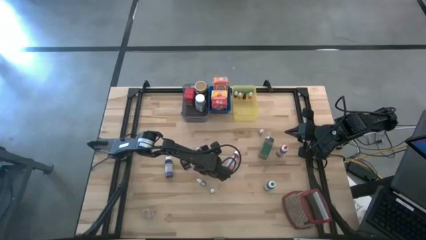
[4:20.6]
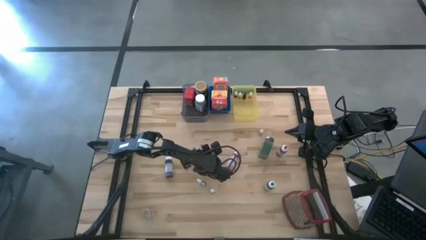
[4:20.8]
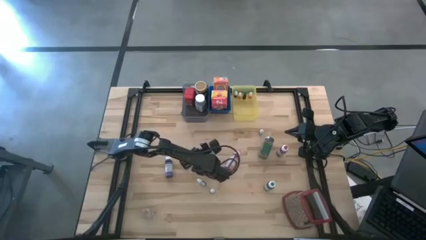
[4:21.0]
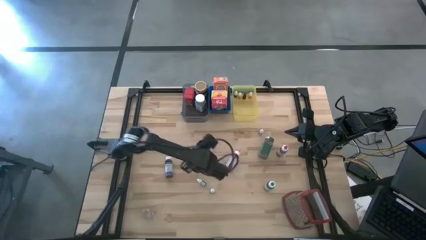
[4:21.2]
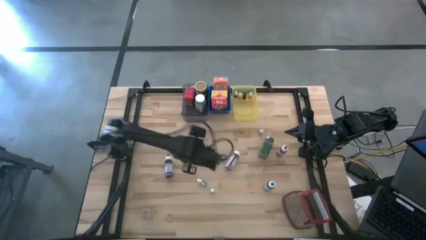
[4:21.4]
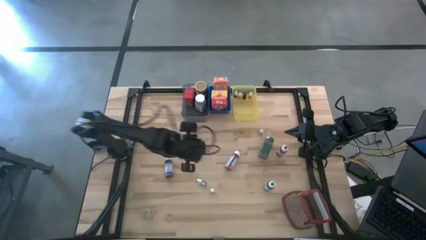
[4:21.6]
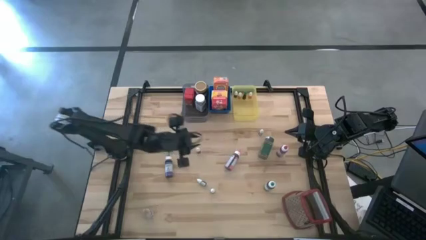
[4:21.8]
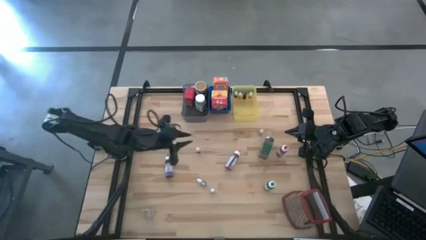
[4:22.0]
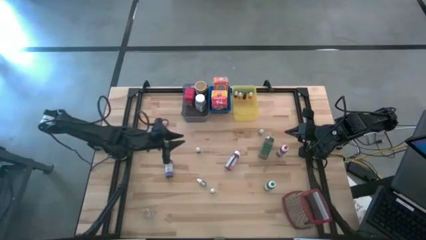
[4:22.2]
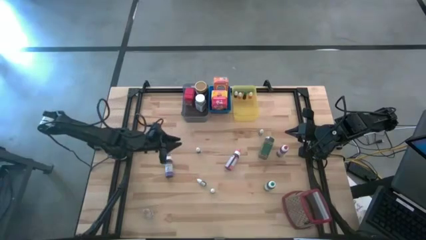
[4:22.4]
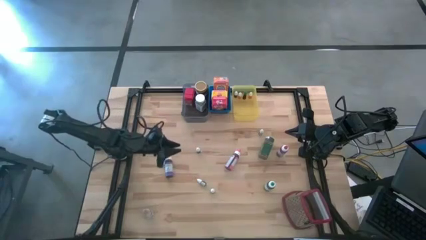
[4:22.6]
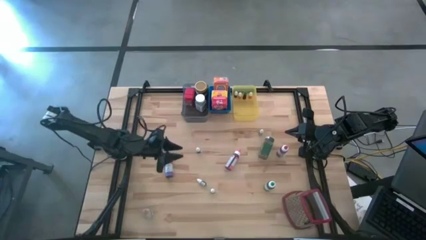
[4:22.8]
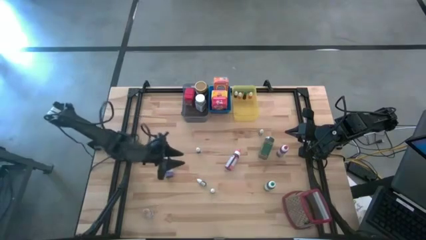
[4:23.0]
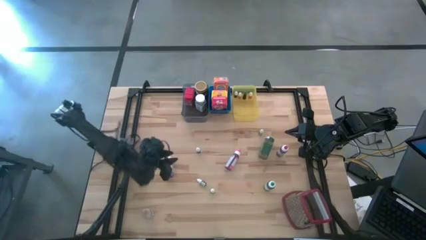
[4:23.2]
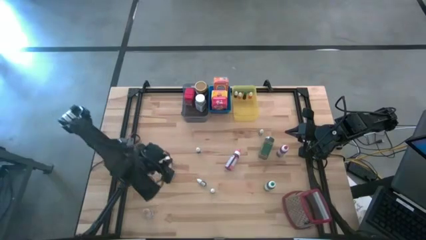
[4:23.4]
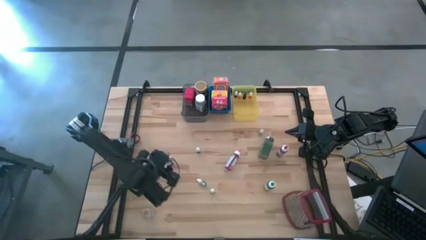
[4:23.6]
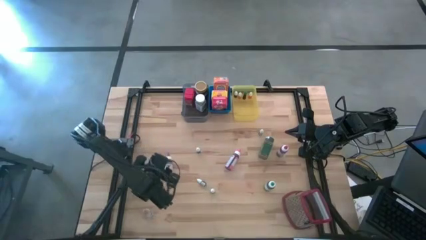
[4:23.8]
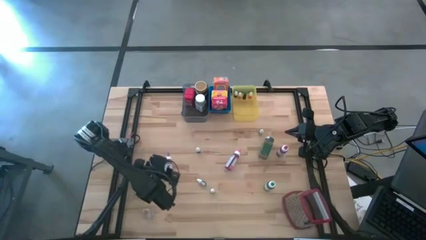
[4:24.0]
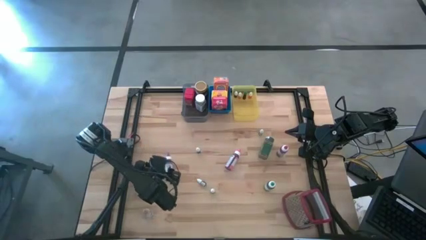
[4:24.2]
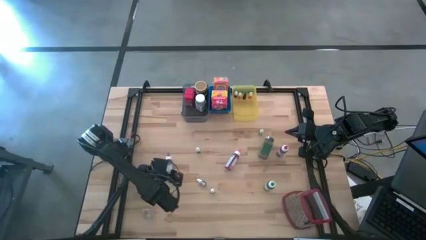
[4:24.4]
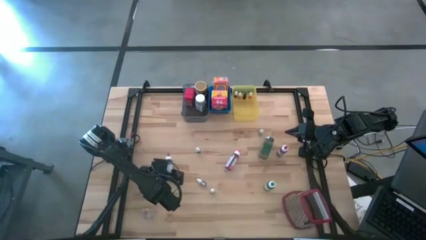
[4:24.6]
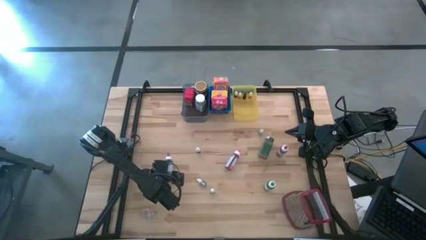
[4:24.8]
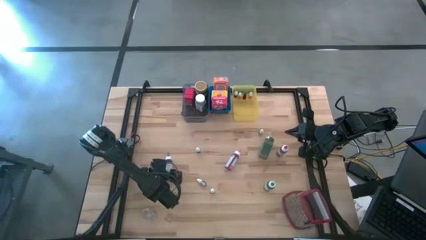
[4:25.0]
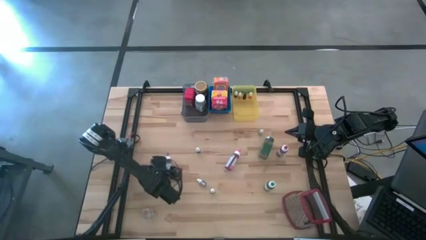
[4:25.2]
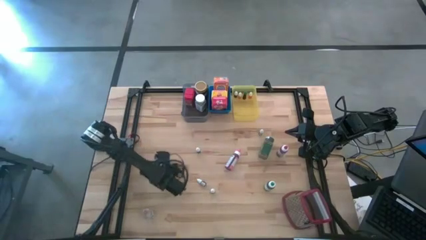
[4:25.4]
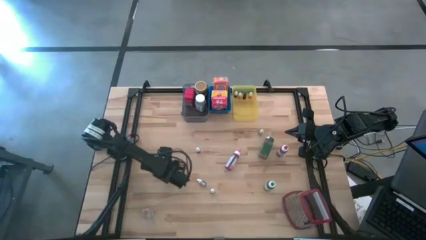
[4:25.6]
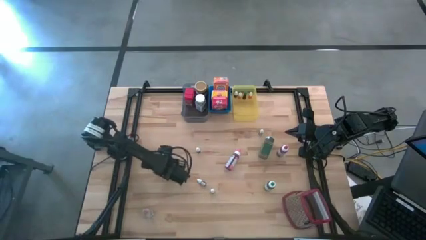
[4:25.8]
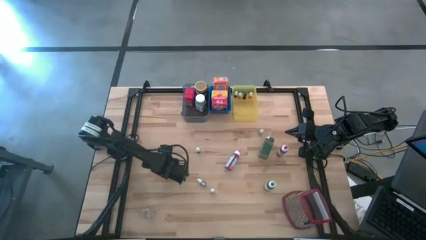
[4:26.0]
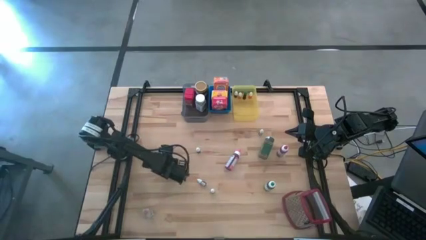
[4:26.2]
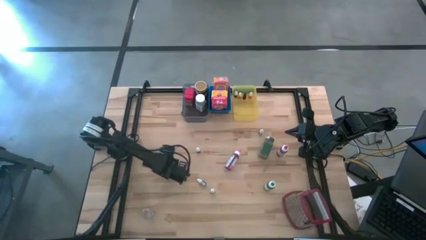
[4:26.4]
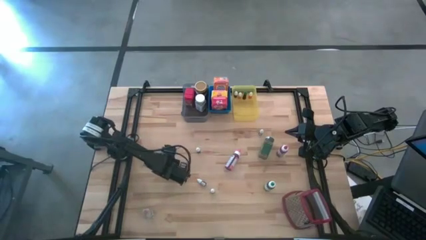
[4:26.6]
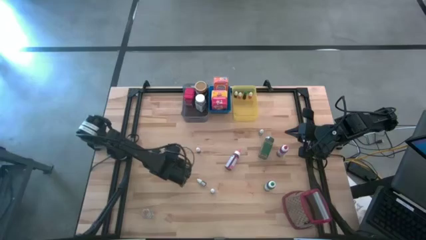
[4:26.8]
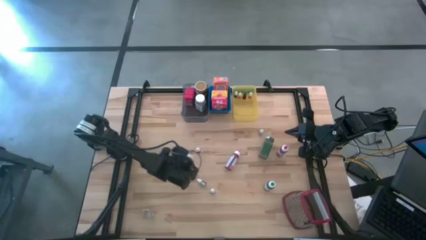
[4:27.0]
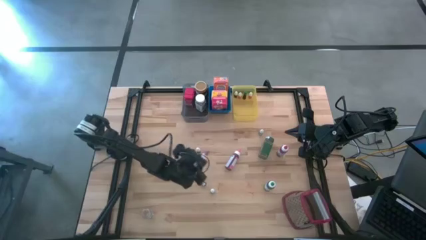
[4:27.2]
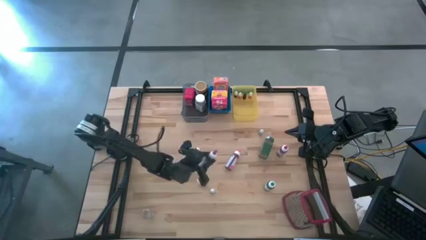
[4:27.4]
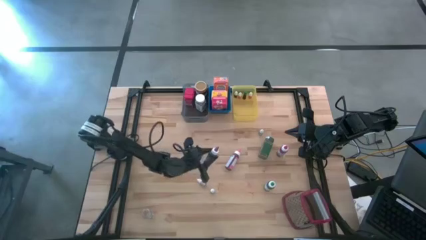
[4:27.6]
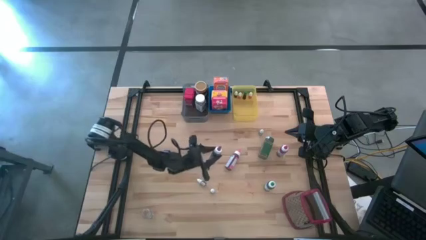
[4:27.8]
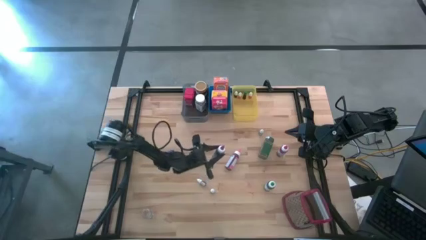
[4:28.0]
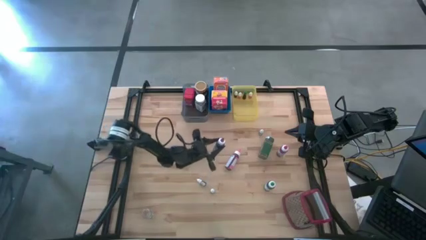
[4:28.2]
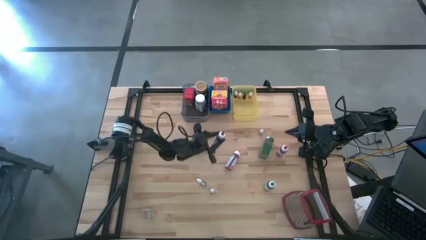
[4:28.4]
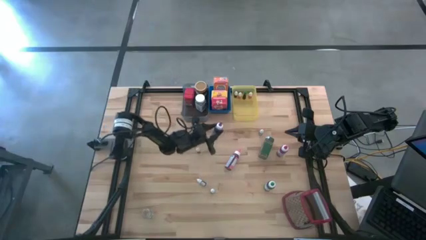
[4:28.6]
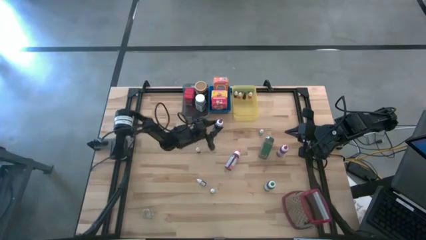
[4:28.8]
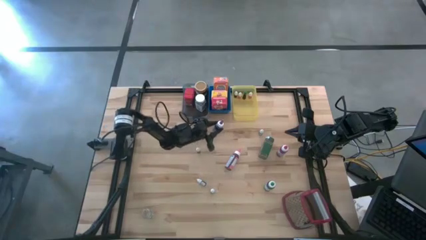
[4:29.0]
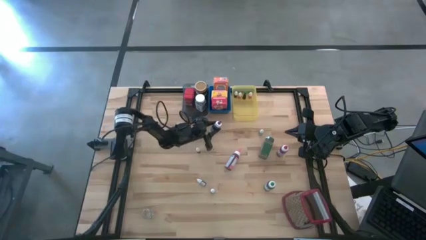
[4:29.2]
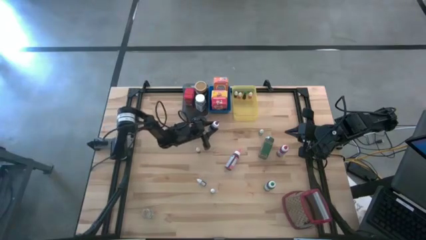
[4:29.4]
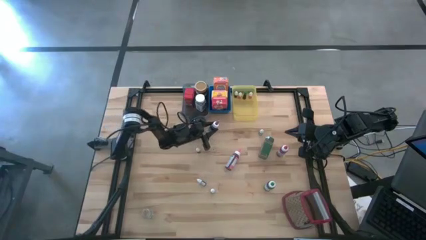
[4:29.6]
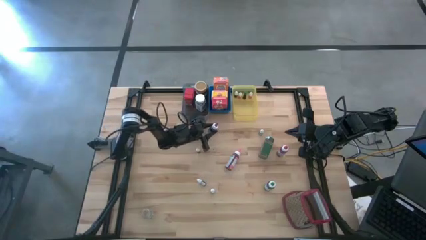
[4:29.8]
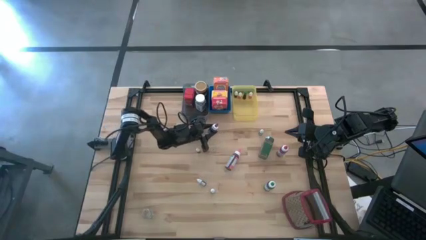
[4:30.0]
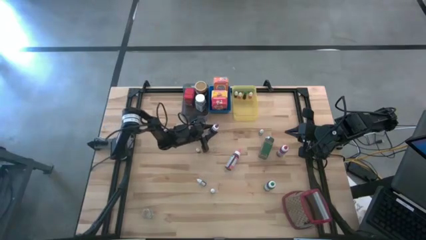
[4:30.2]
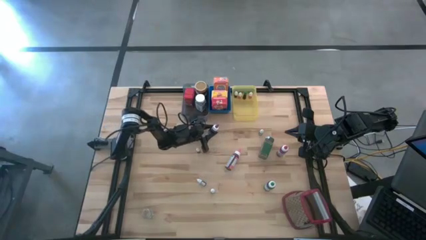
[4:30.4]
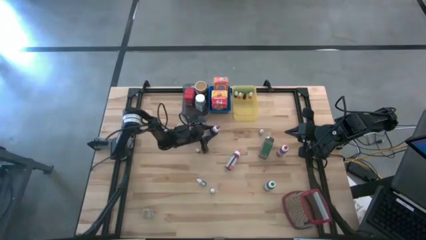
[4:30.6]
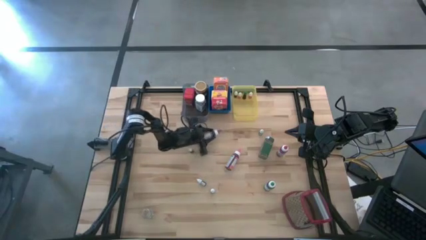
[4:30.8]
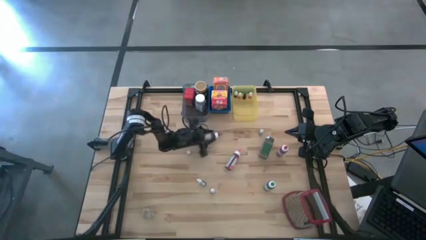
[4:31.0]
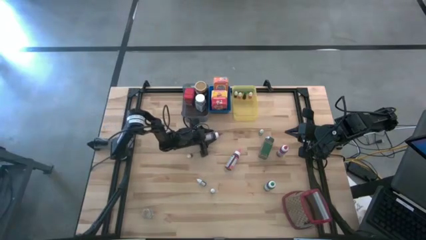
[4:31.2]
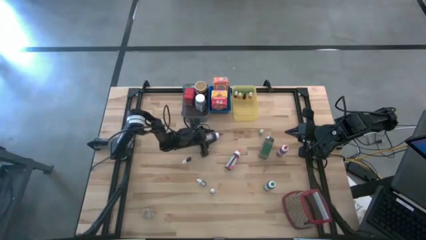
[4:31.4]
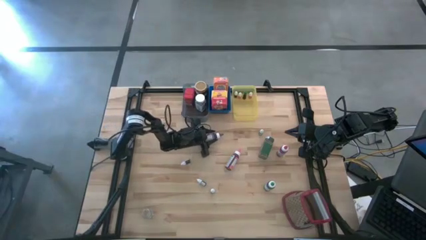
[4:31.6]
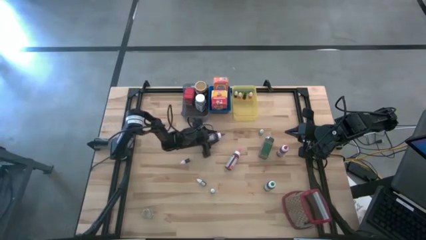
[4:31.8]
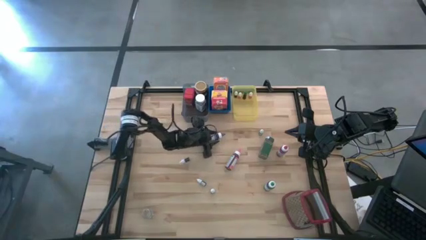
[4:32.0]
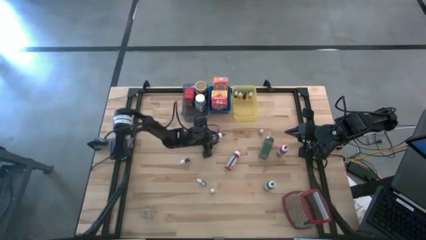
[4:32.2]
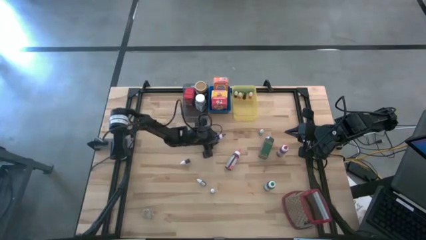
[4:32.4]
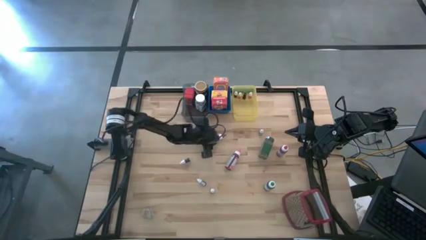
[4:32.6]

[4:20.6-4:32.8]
Task: Pick & Place Kitchen Items
Move the large violet food coloring bottle to the center of the table

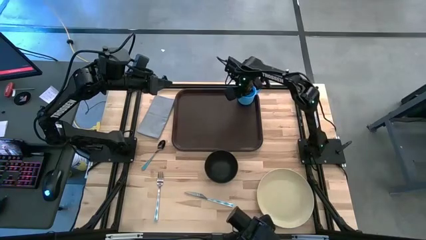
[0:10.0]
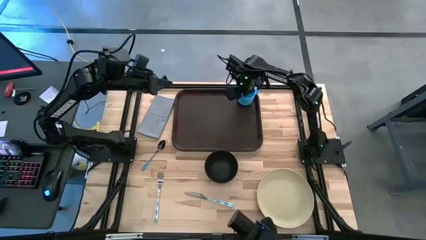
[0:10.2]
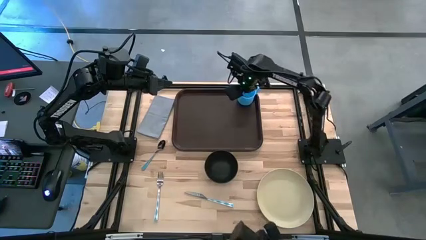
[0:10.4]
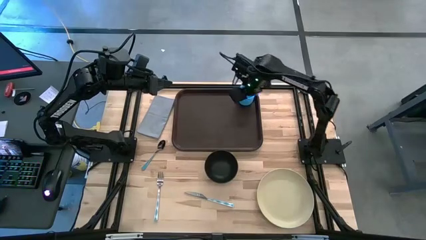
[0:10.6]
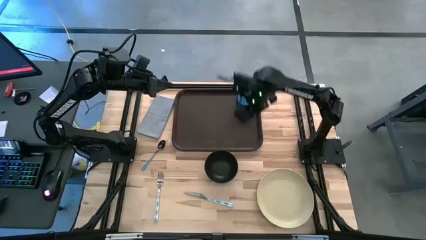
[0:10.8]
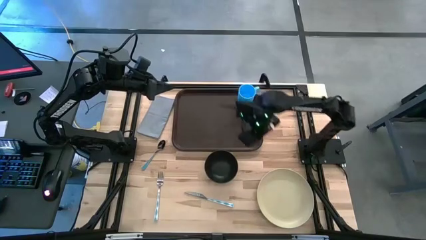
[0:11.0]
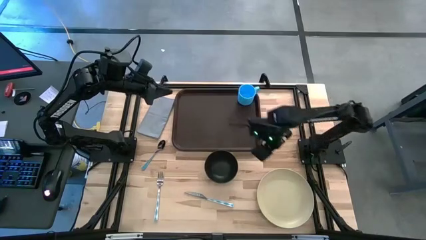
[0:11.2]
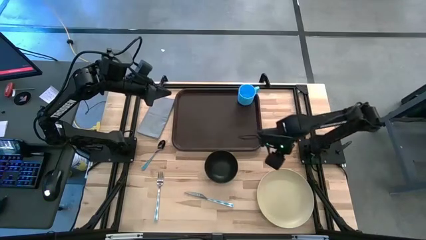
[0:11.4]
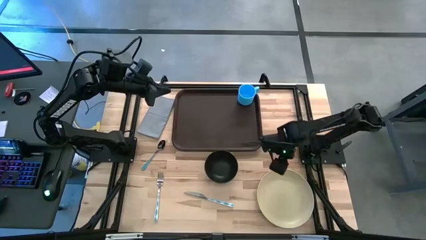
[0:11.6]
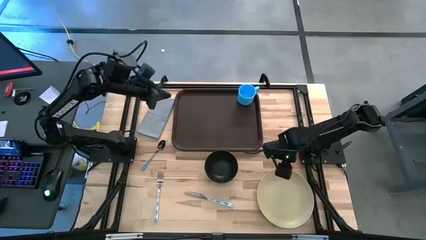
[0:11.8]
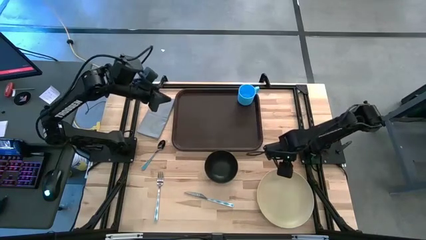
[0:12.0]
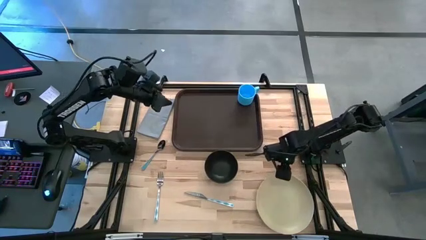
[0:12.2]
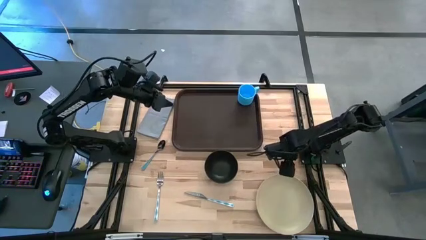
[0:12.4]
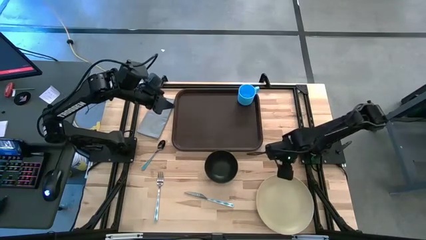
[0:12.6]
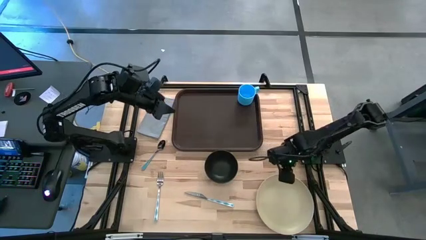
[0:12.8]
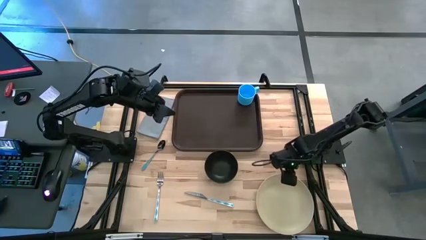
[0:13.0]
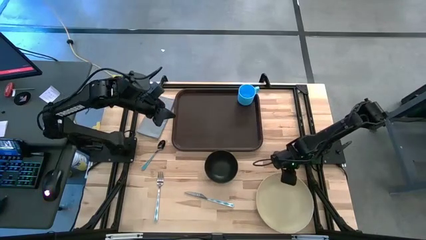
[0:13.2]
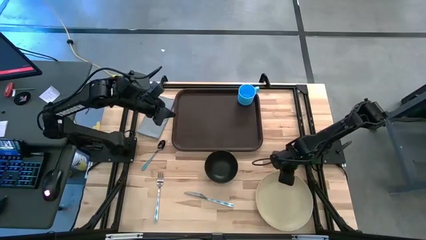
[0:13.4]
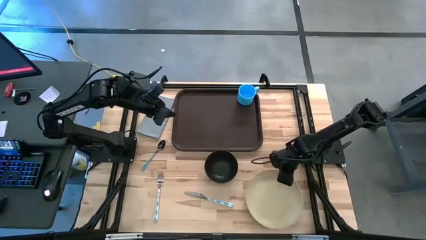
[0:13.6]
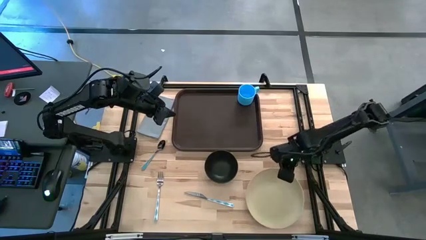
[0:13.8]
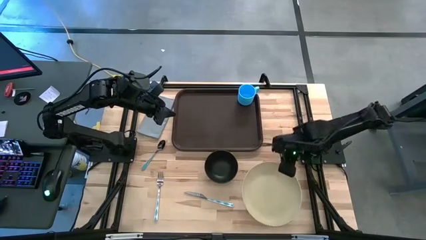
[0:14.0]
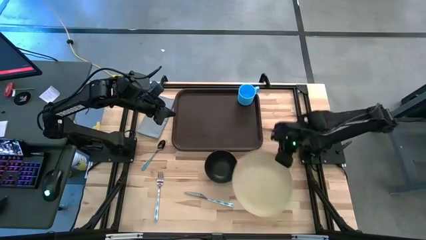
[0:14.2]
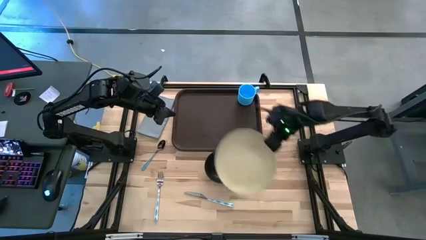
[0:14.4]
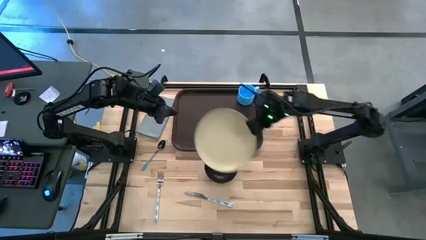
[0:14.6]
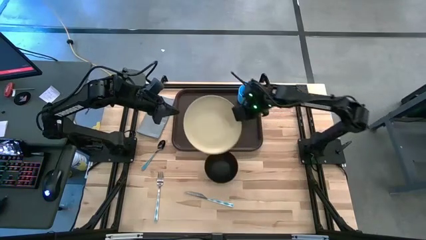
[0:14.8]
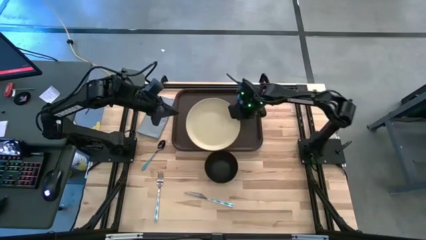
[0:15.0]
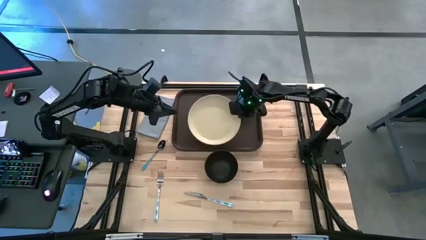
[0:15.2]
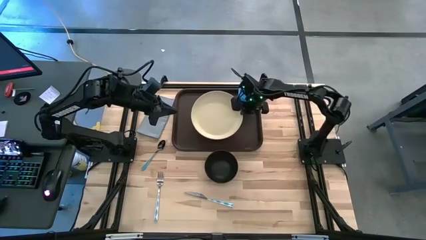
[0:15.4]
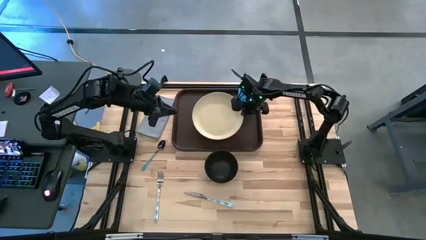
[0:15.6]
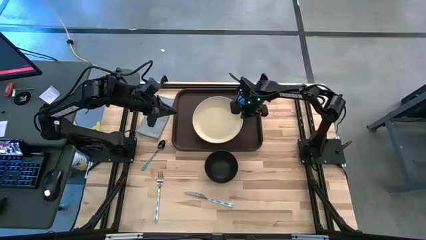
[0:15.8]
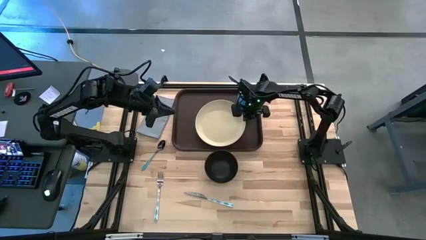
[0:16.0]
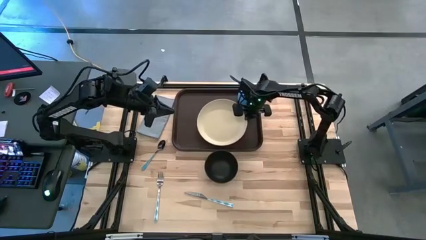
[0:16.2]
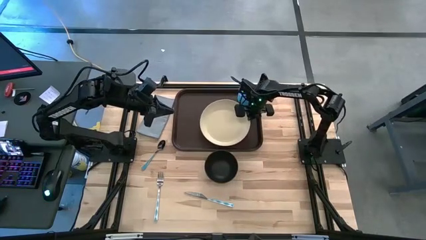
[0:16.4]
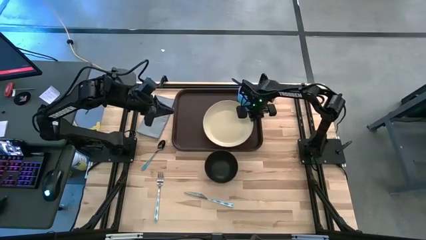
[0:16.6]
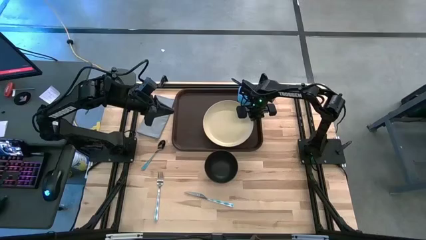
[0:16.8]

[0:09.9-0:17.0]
Task: Set up tray
Put the white plate on the brown tray to the bottom left of the blue cup
